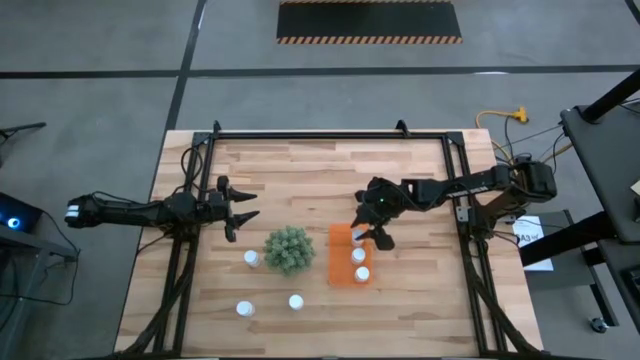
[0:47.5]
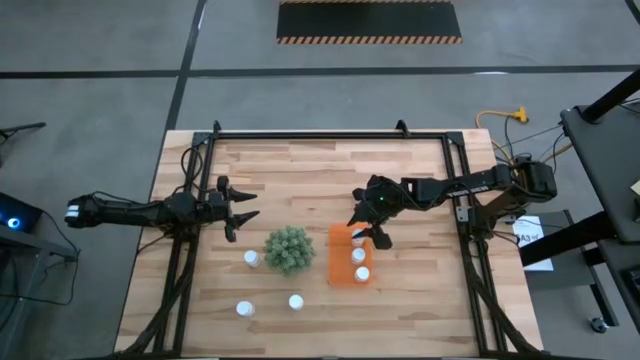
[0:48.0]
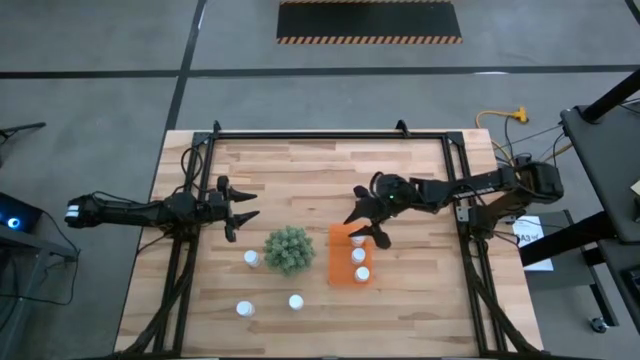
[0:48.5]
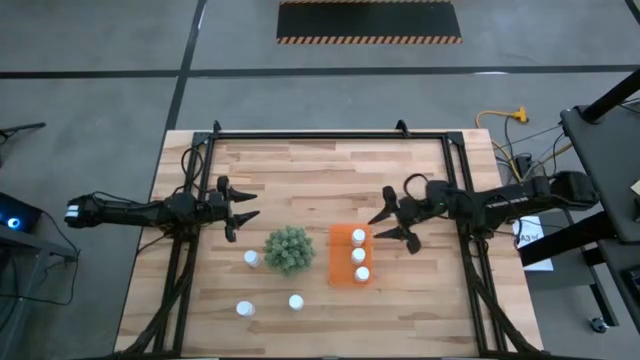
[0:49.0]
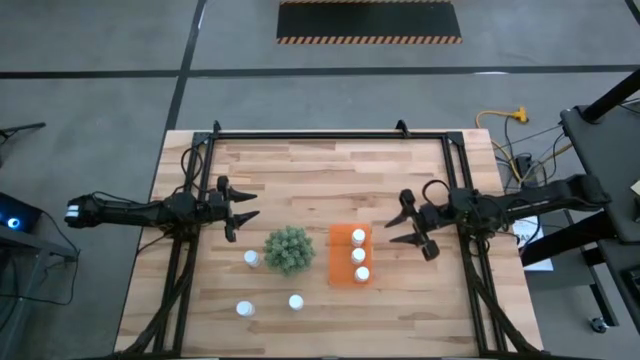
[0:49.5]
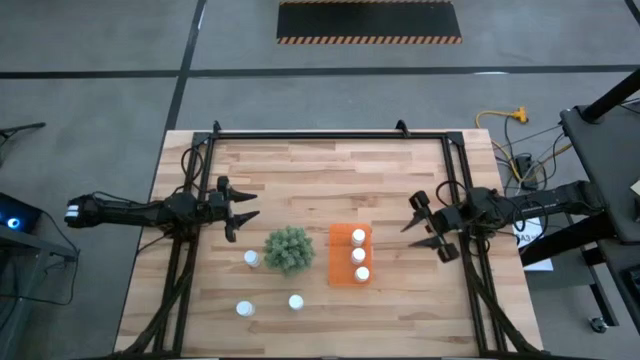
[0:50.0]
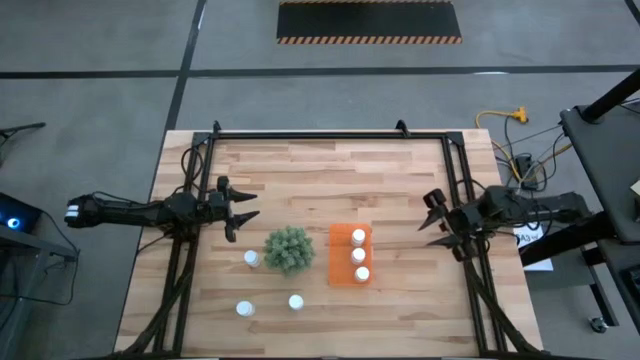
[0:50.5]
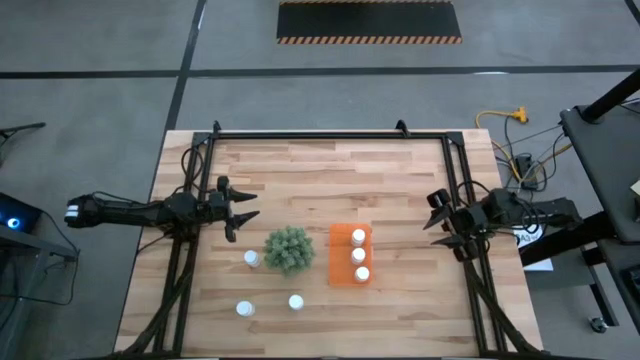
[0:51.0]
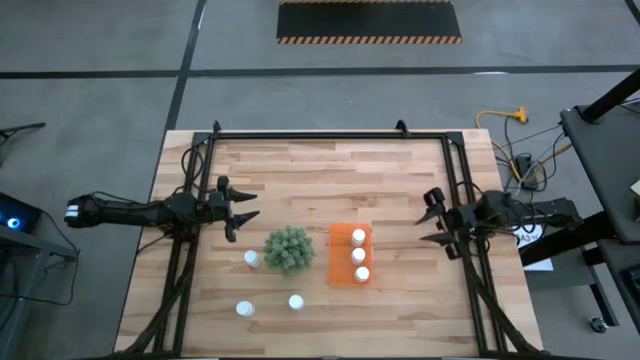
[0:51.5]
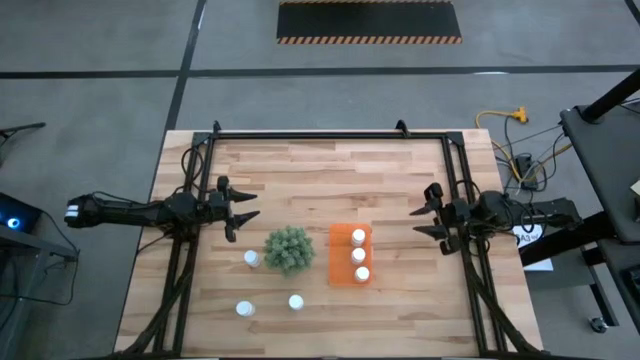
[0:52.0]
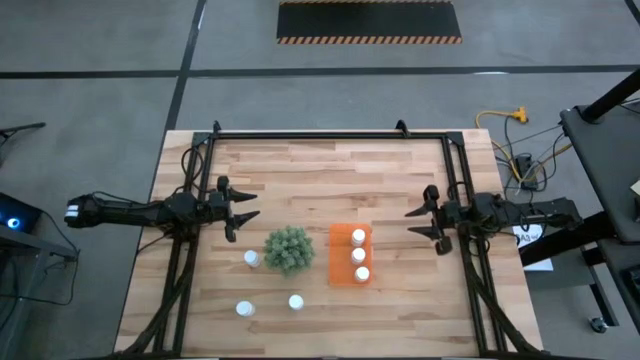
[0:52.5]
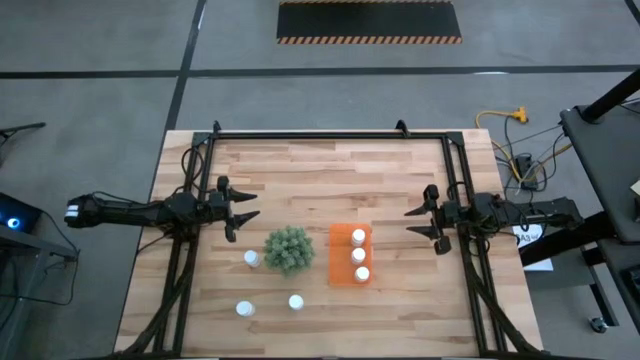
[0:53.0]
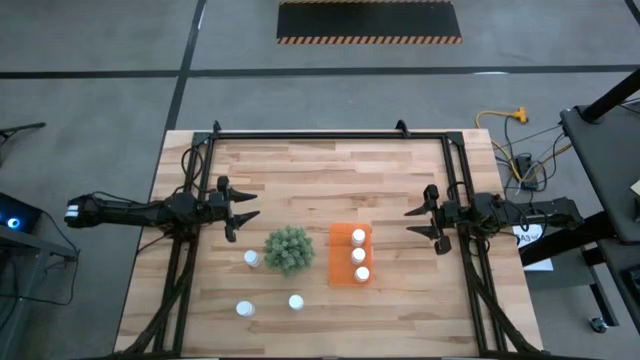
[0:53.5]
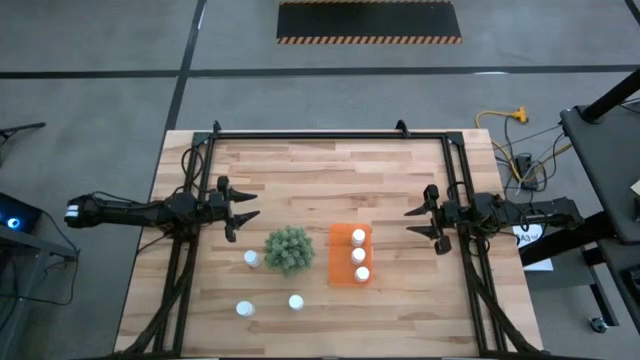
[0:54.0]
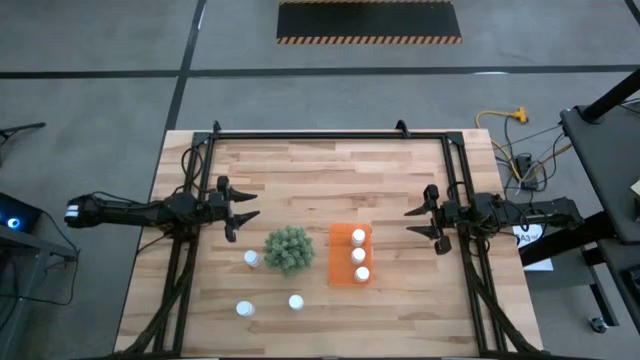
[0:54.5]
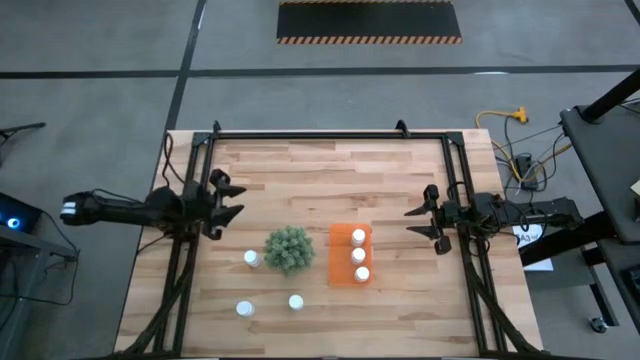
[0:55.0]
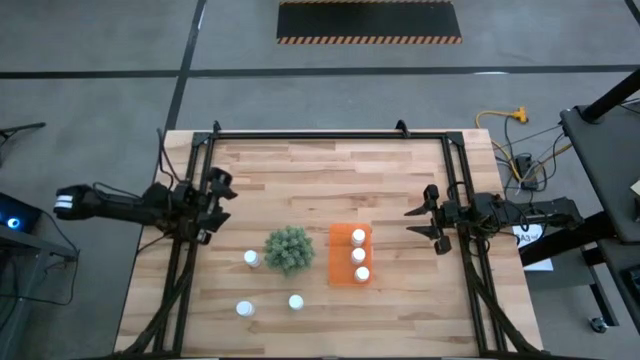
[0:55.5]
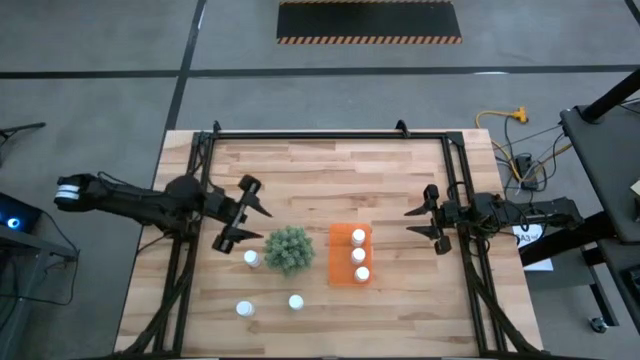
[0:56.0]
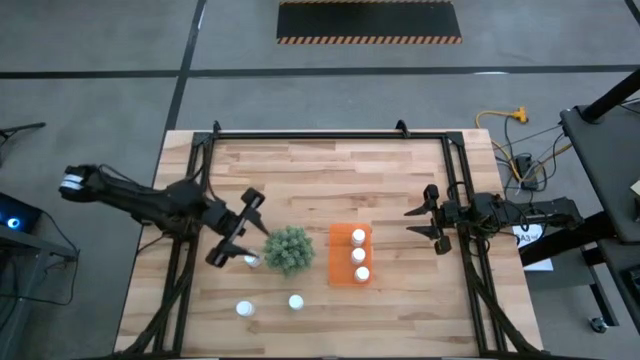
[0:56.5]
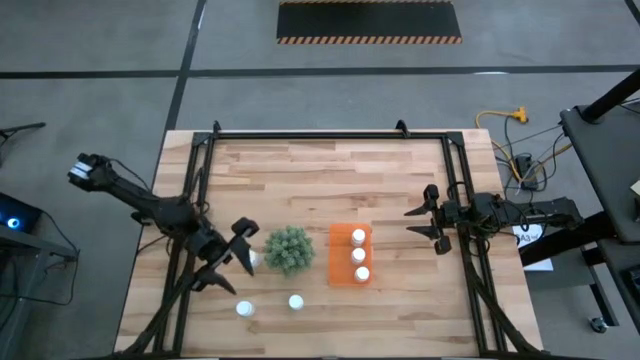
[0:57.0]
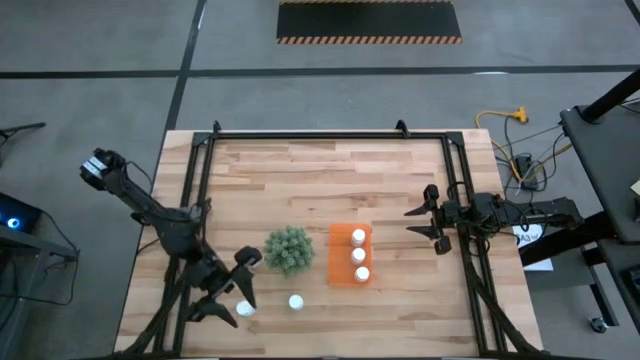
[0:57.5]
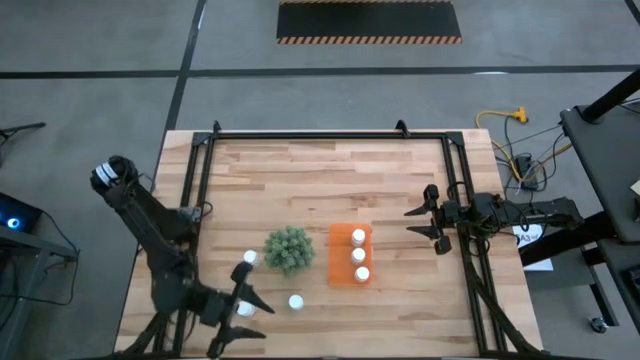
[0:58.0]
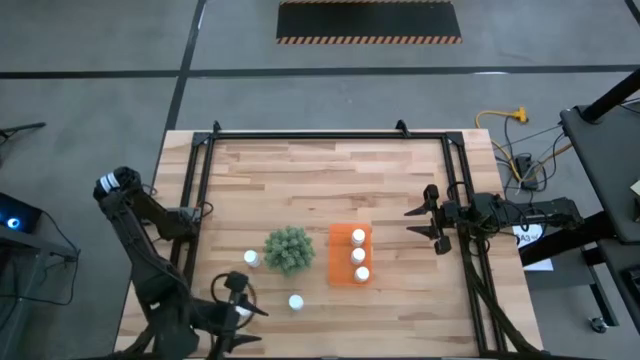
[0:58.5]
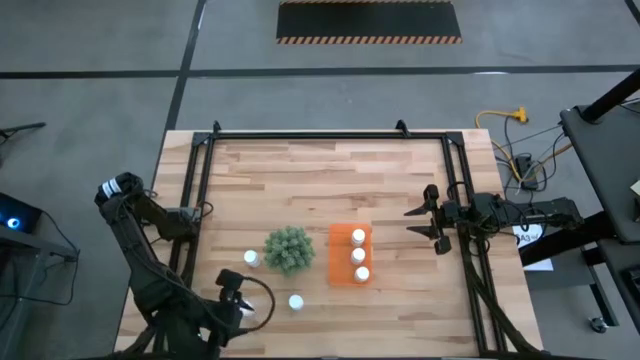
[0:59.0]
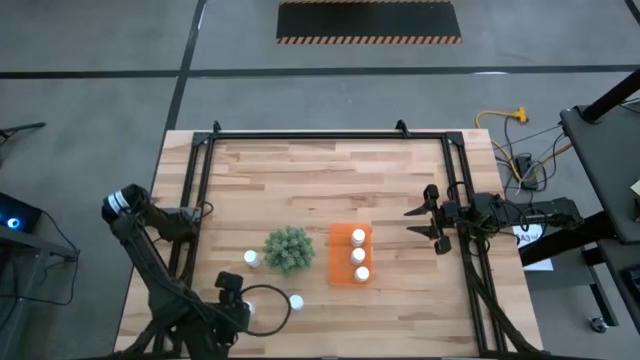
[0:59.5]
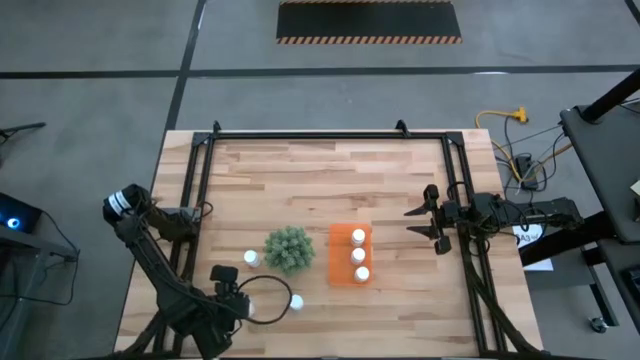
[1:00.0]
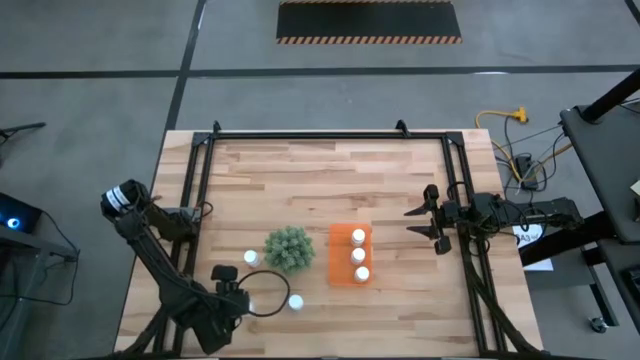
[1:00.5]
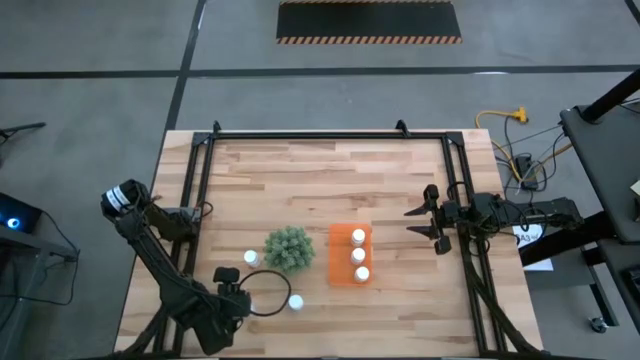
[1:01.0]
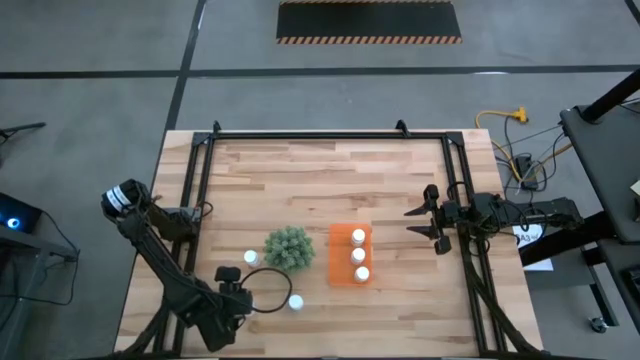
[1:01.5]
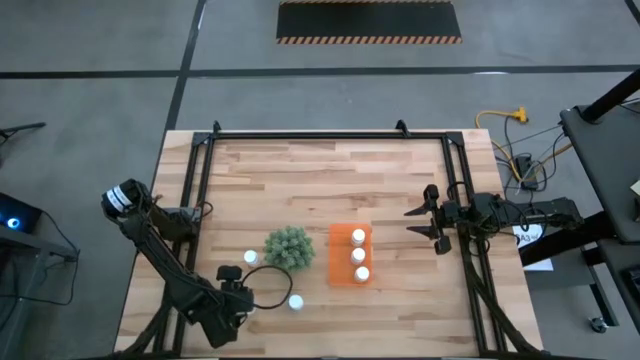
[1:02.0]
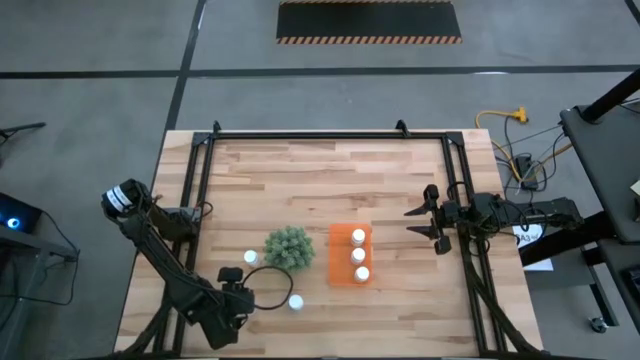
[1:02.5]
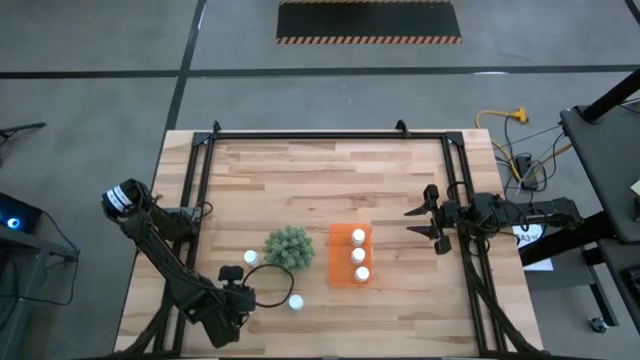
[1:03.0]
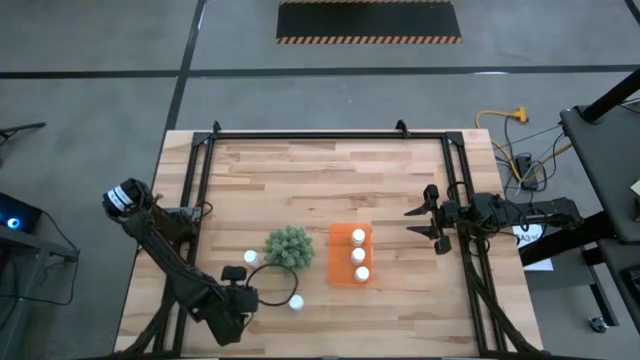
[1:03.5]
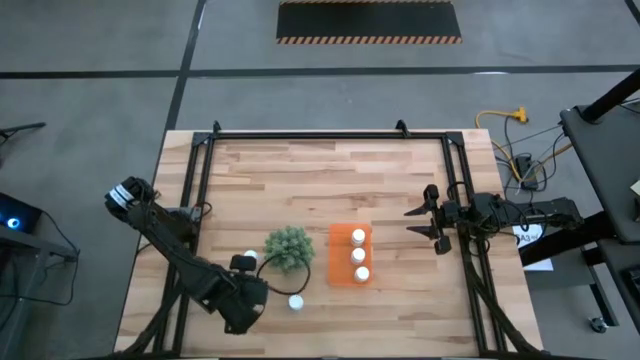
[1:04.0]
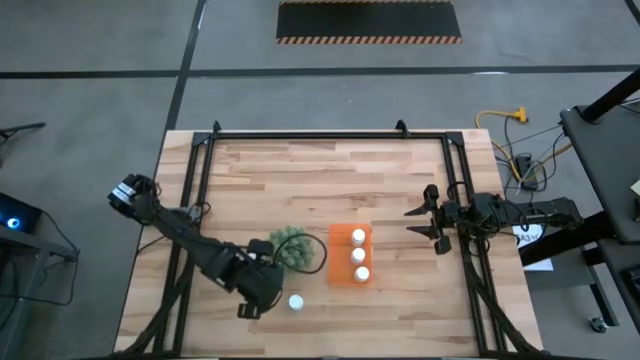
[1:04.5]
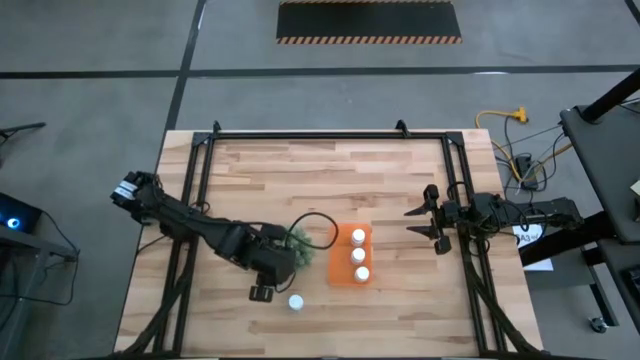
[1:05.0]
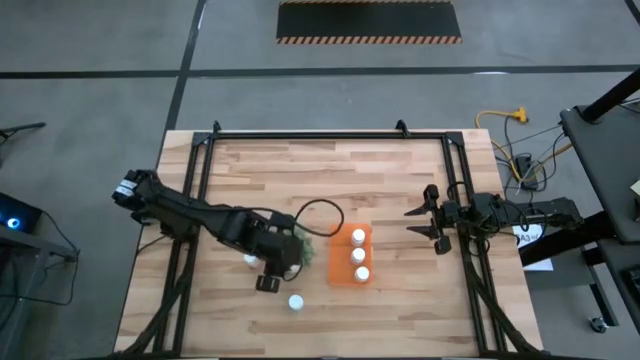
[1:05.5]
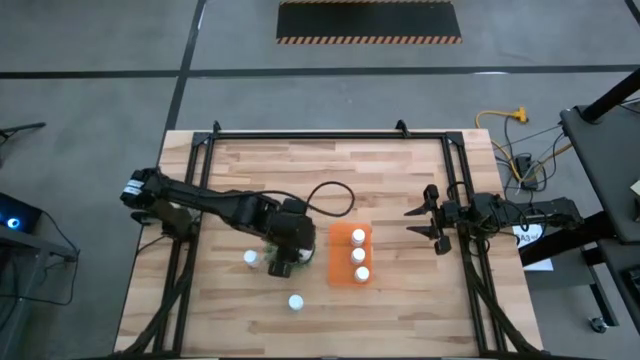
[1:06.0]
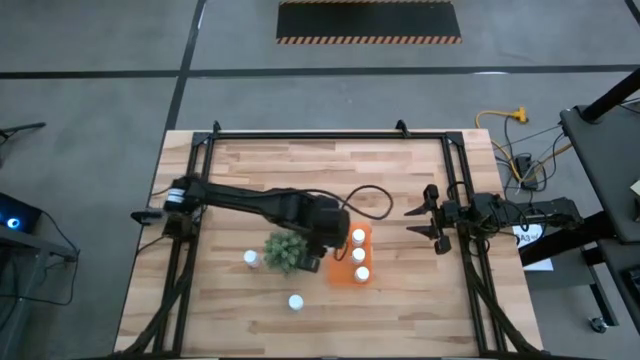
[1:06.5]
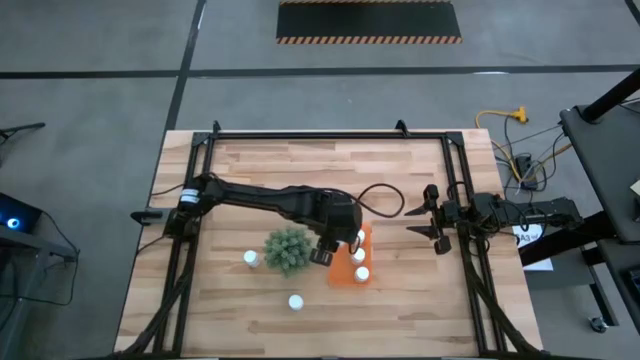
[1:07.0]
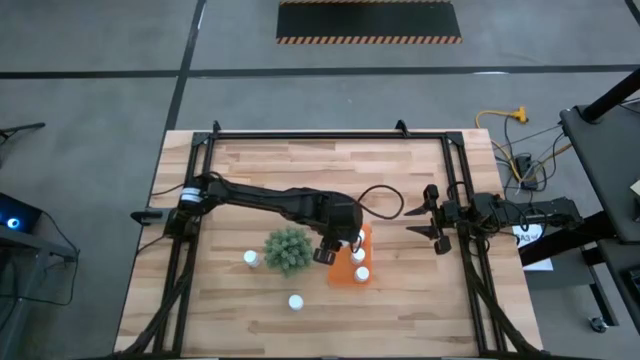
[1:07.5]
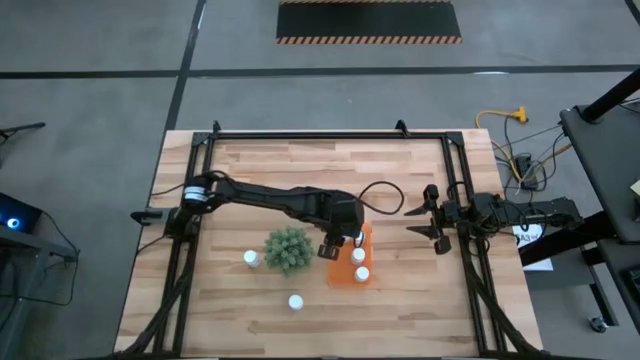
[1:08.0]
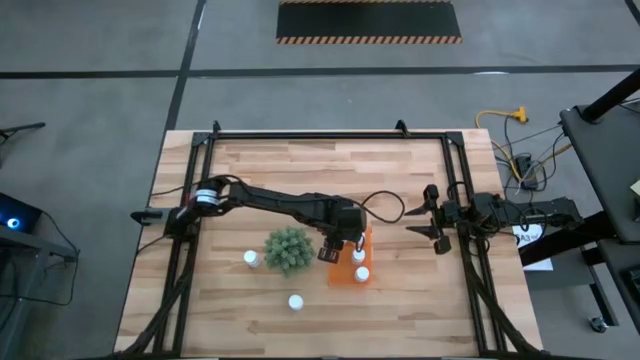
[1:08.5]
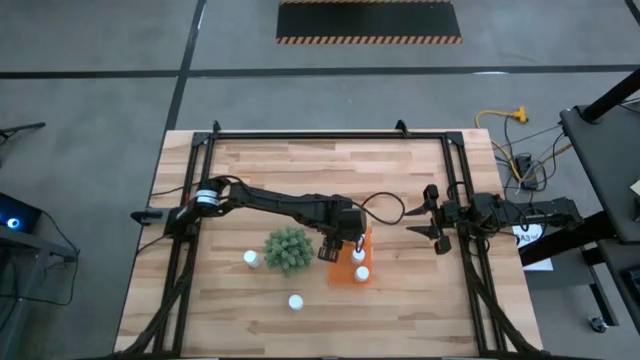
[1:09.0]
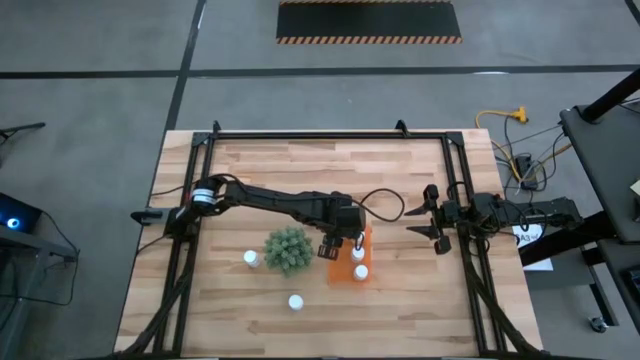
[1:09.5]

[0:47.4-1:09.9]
Task: Pick and place pill bottles into a basket
Put the white medicine bottle into the orange bin
